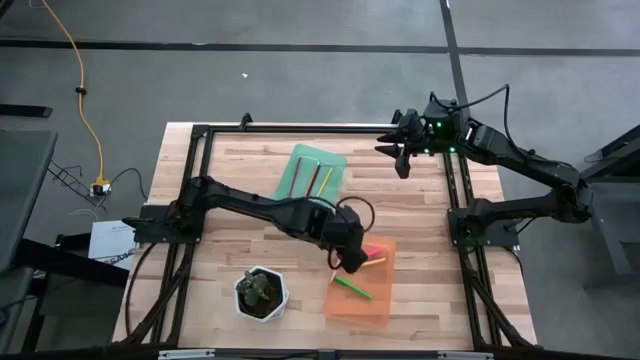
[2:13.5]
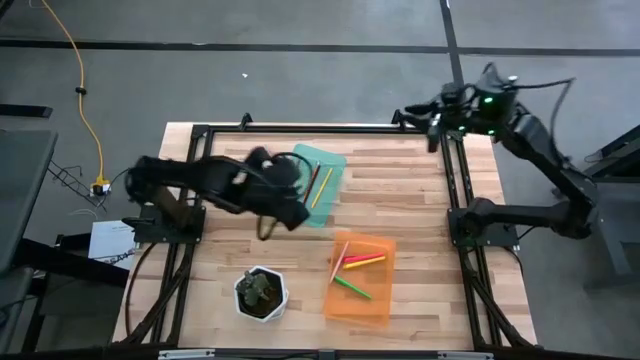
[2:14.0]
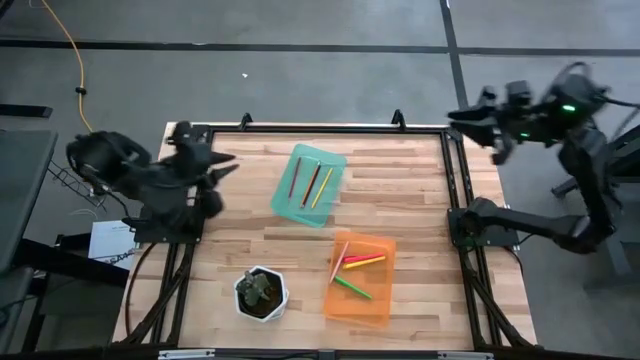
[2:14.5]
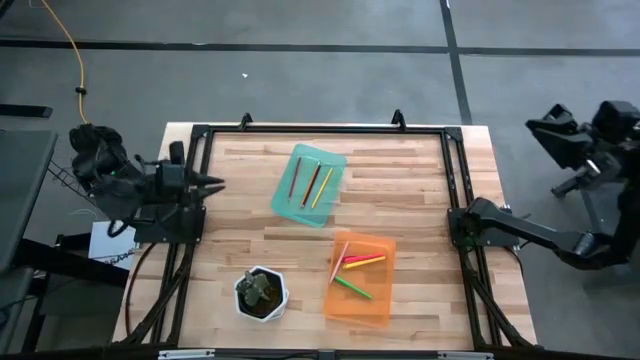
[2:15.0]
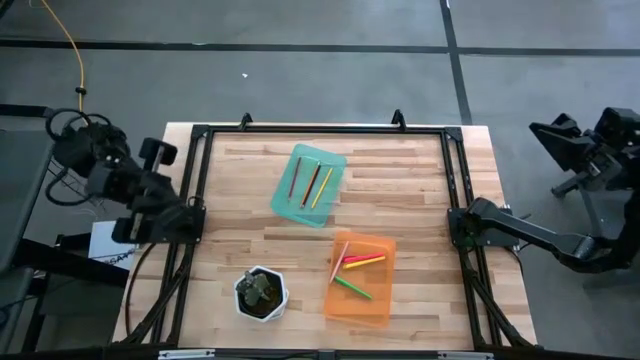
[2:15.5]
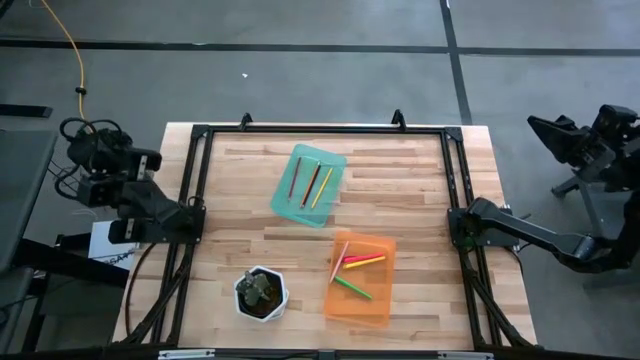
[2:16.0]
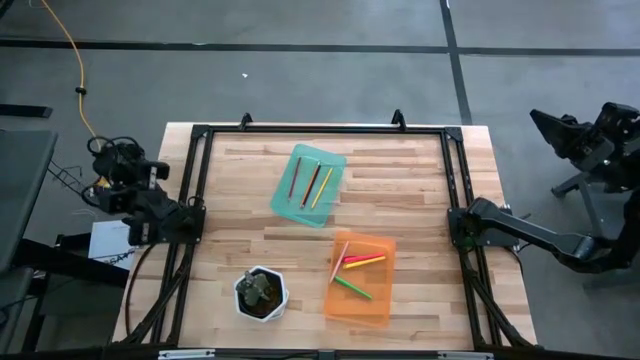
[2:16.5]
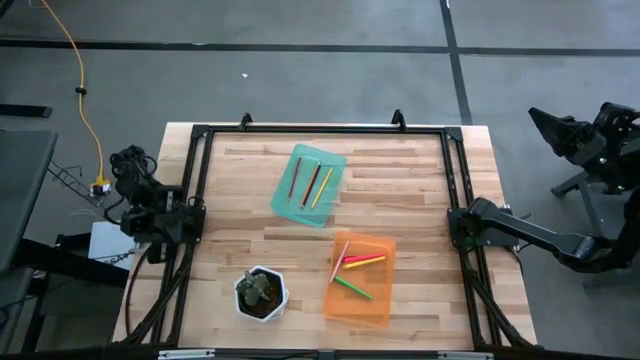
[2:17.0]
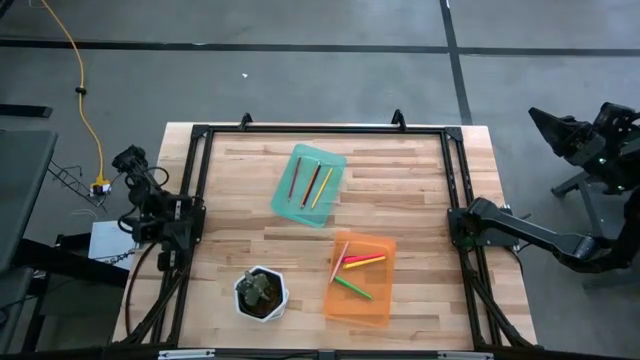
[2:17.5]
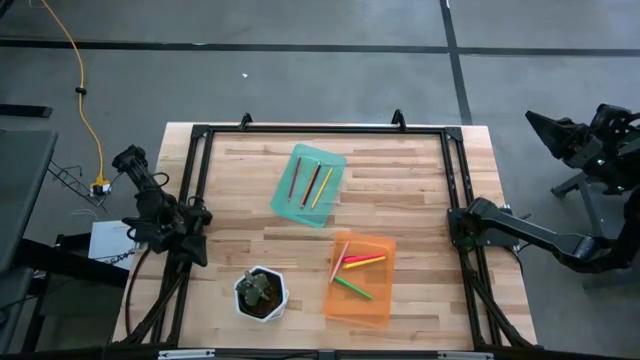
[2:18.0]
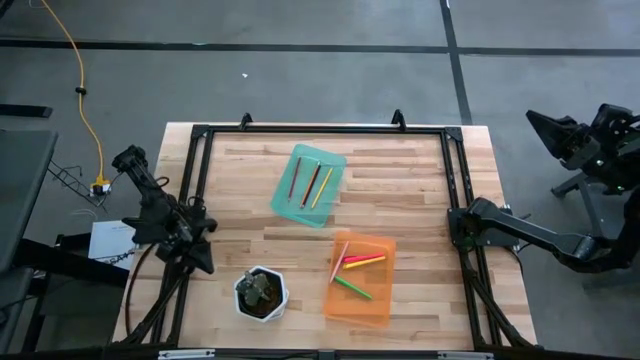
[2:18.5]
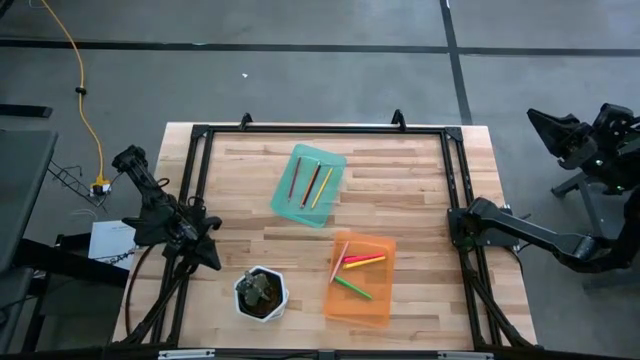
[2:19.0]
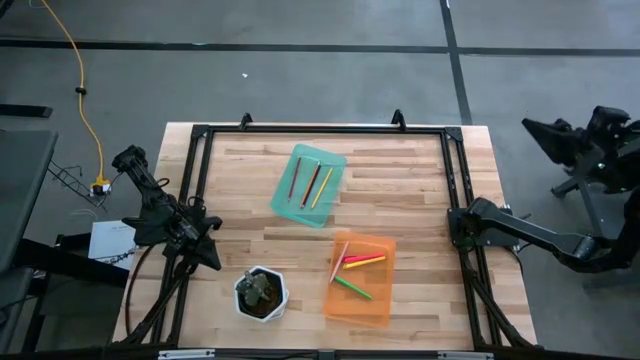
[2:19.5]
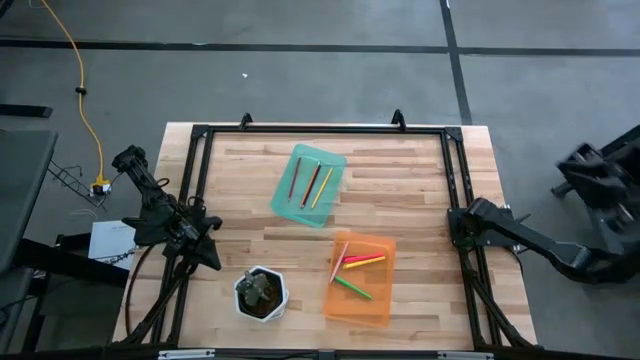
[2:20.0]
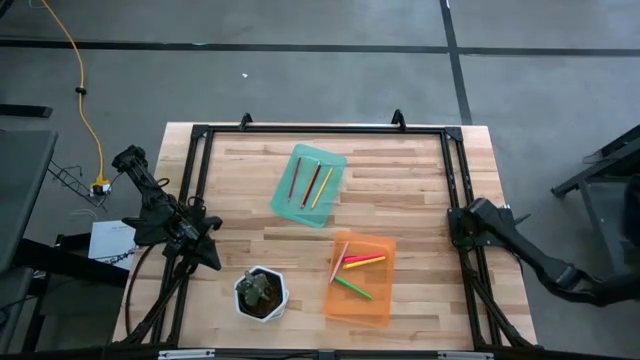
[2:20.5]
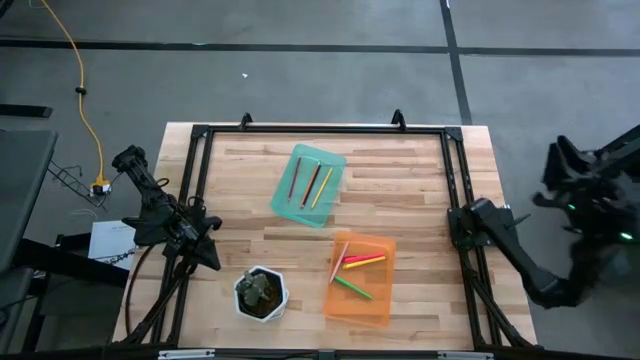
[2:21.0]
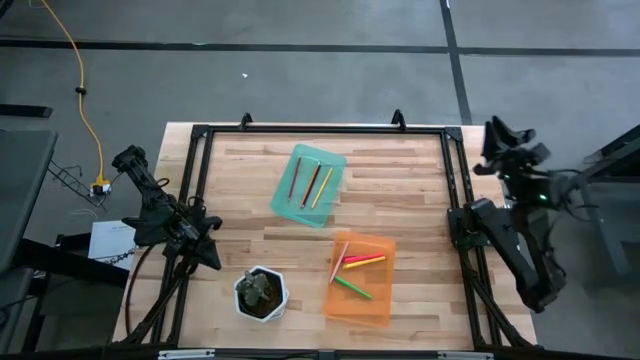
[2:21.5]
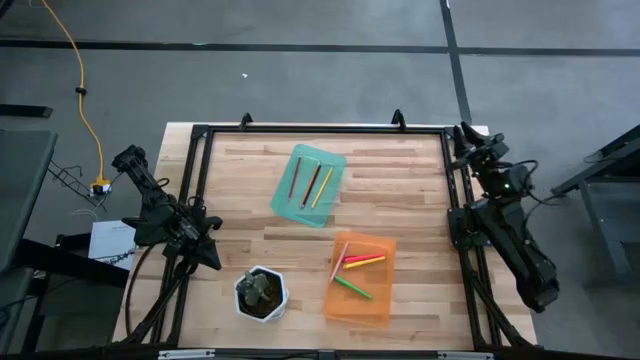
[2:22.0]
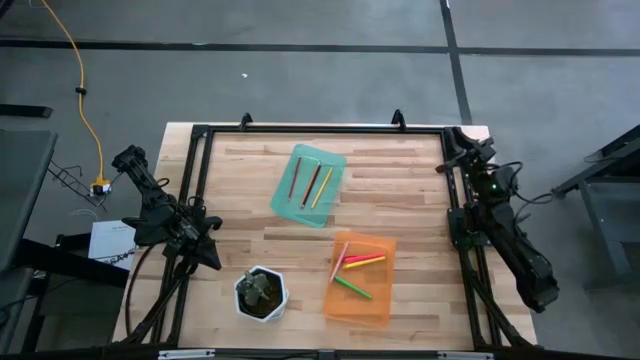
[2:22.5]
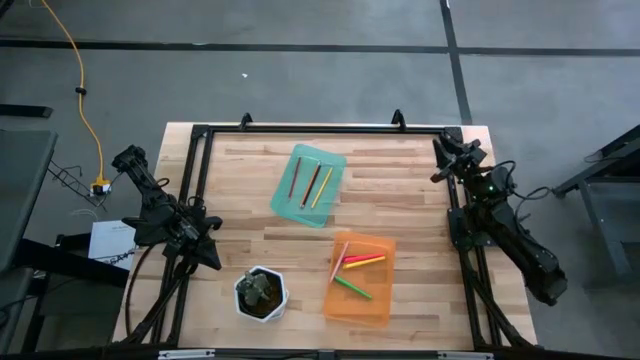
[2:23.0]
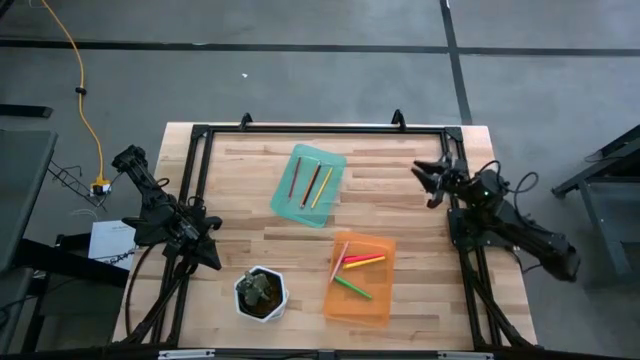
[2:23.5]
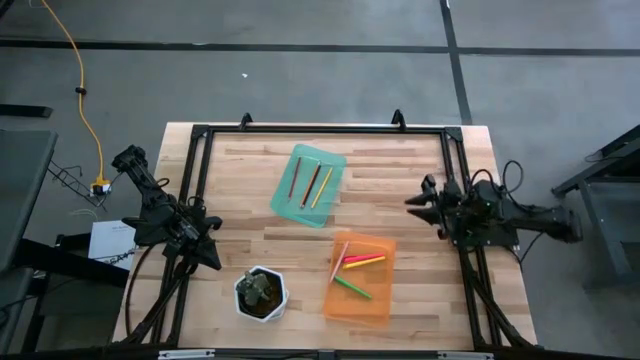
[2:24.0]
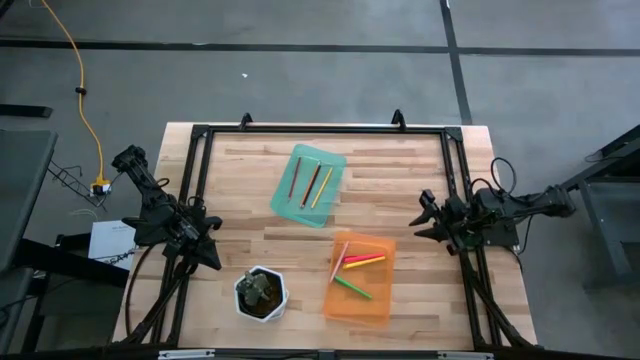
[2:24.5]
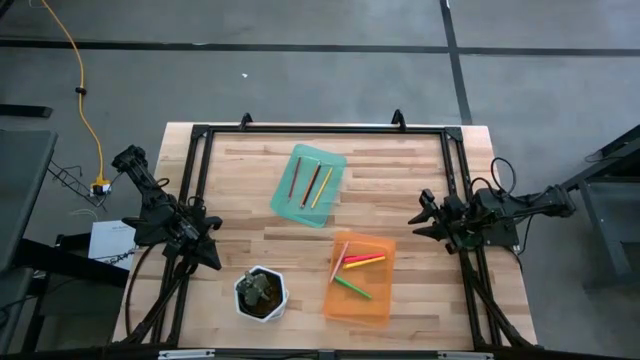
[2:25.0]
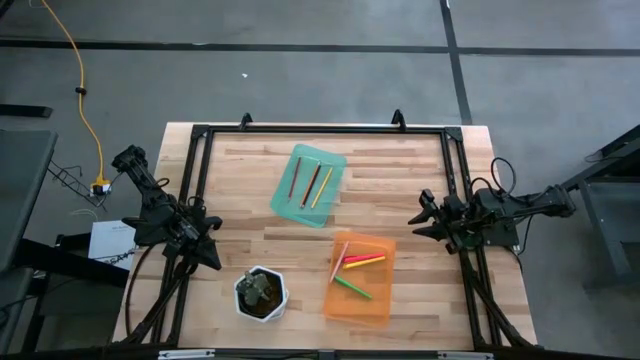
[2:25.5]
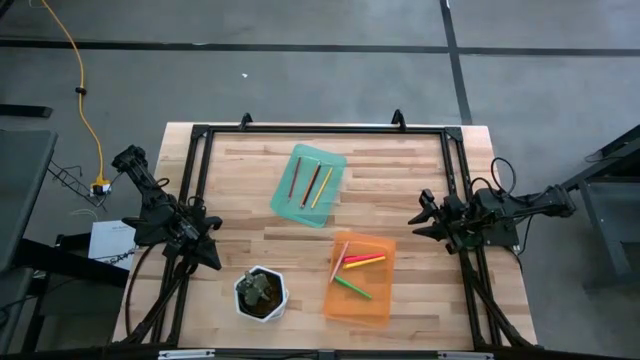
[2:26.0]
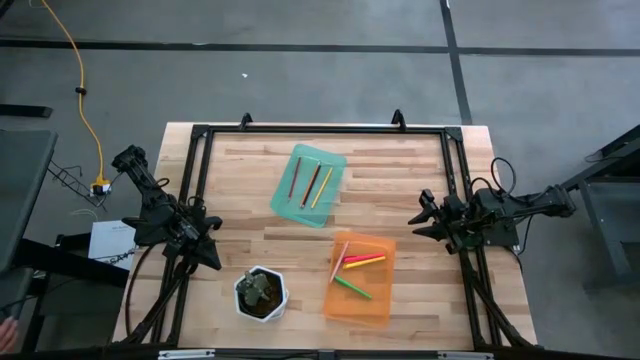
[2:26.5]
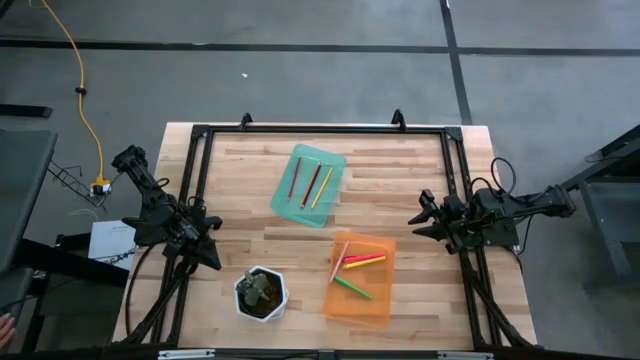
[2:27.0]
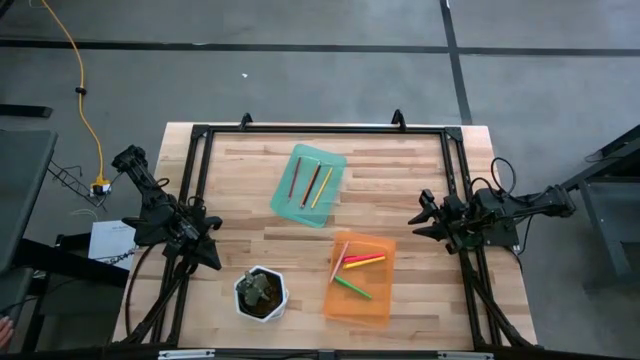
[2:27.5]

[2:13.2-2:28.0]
Task: Sort pens & pencils
Return to Home Position
